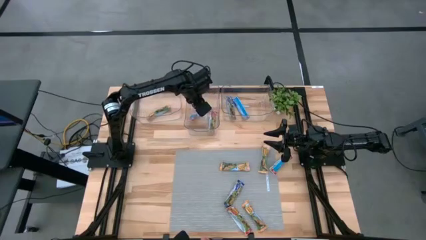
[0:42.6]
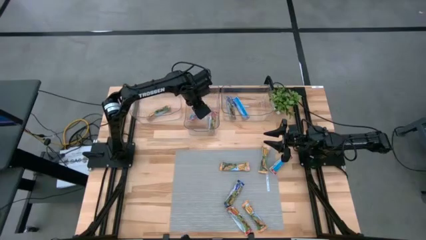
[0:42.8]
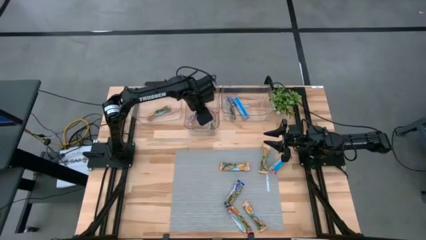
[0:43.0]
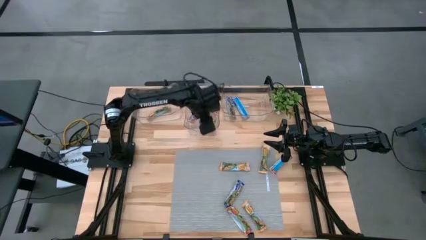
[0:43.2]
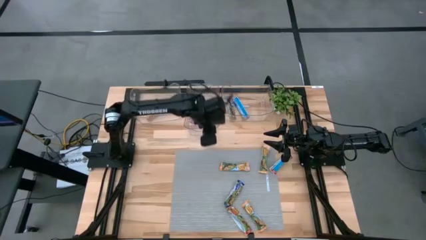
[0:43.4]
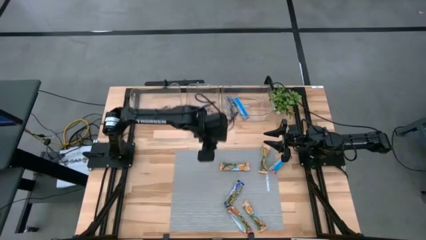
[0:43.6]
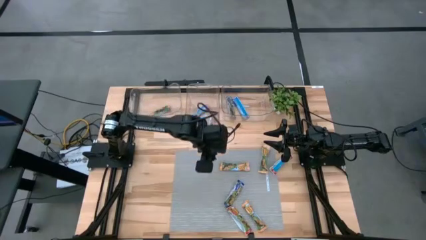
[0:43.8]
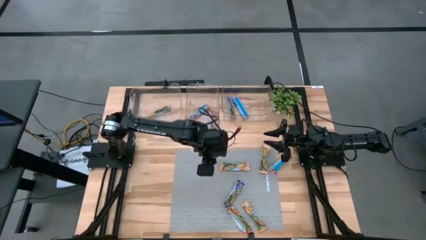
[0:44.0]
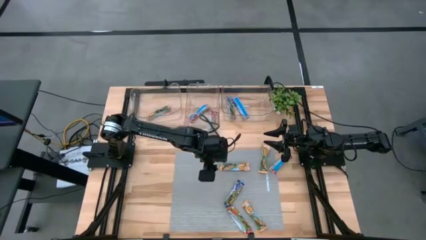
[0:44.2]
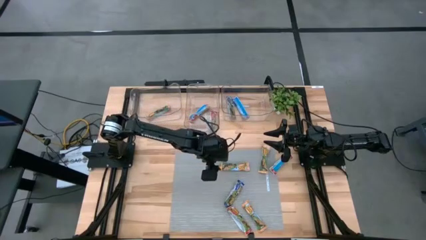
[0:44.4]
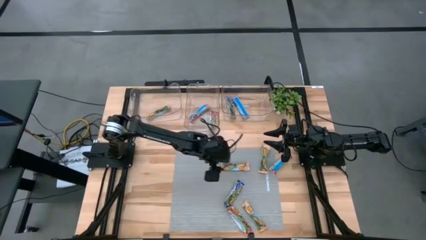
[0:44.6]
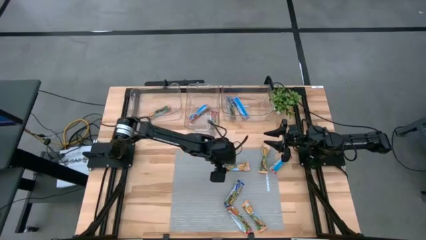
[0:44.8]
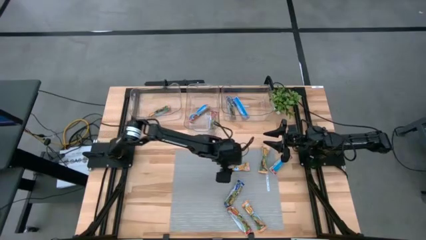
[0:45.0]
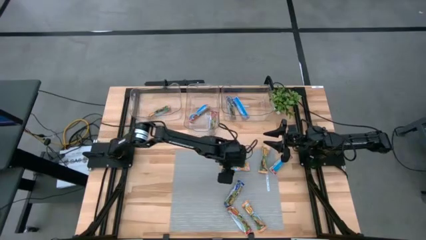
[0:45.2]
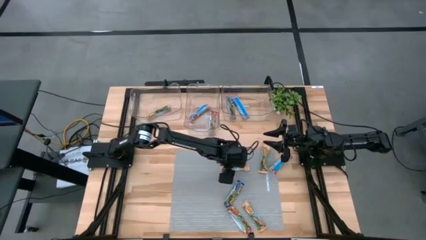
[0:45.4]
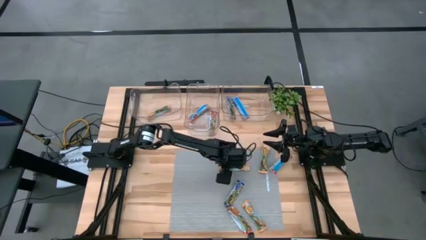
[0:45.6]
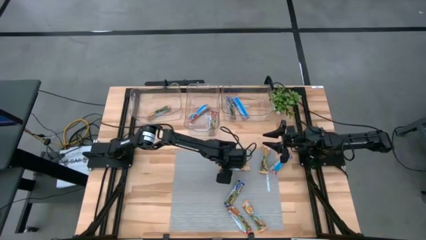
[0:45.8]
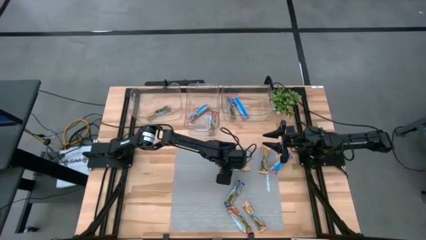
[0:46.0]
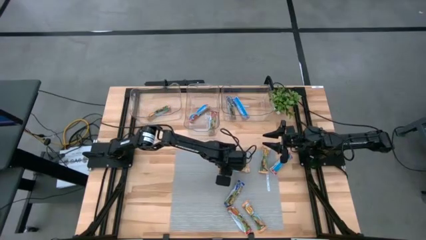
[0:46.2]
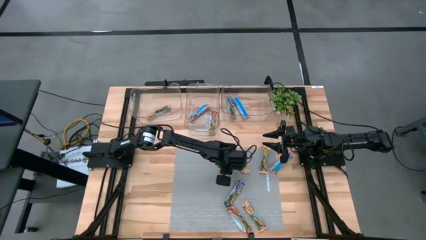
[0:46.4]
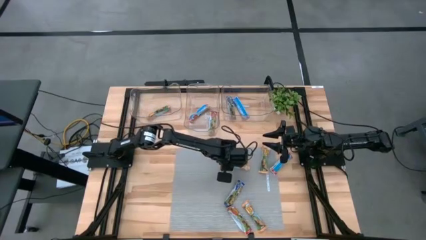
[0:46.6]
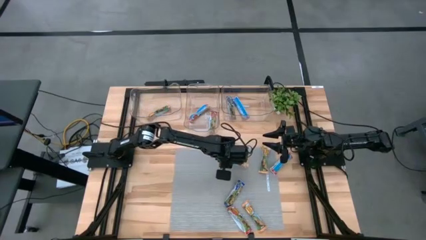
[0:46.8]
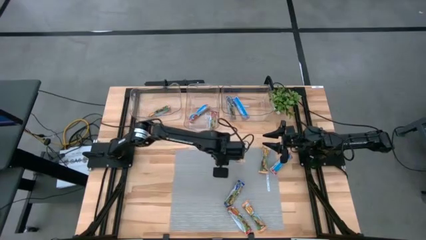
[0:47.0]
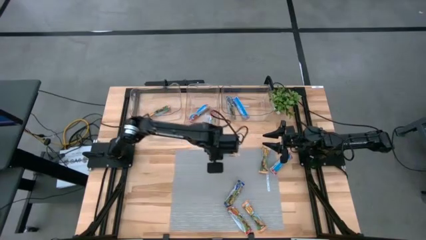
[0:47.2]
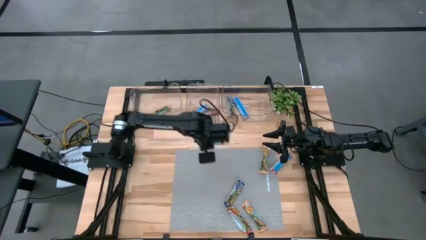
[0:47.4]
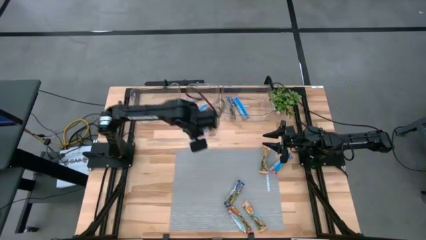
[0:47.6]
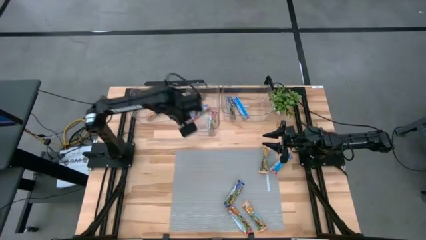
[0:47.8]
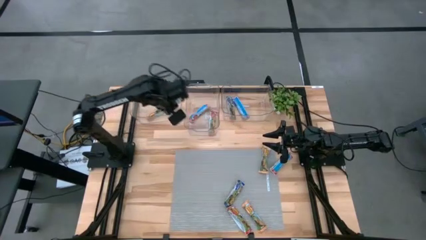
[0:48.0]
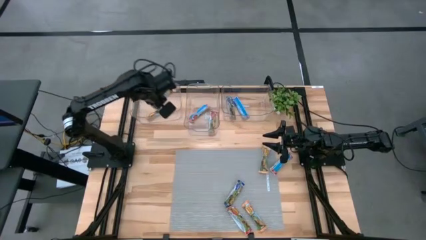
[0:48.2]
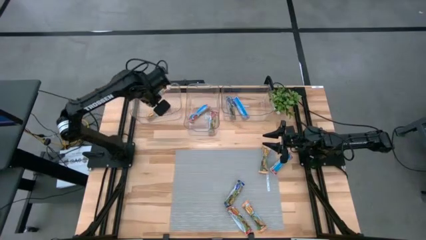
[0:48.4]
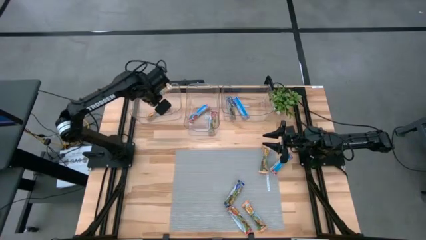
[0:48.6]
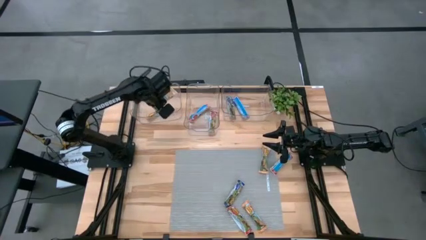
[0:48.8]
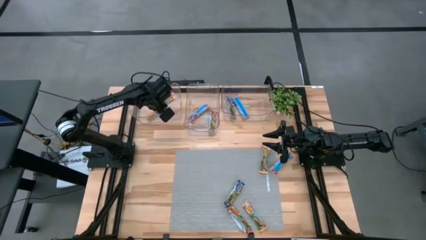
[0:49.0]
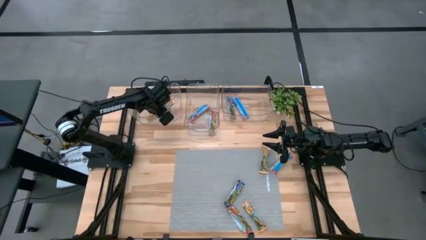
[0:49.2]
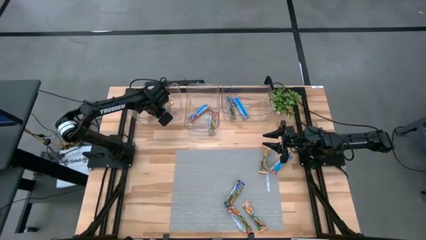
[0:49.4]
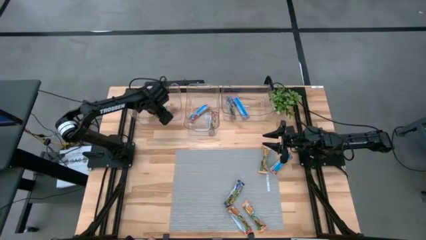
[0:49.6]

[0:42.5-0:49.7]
Task: Pick and place Granola Bars by type
Put the yellow granola bar into the left transparent bin

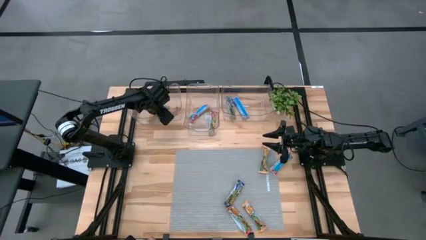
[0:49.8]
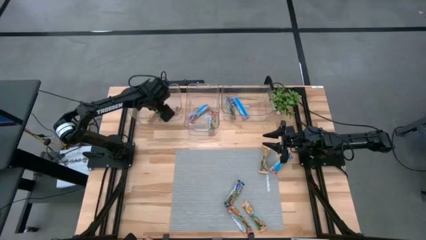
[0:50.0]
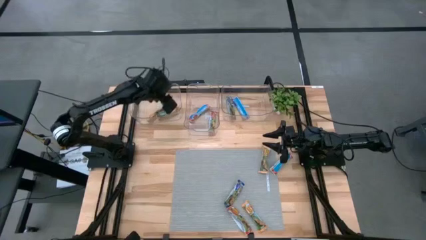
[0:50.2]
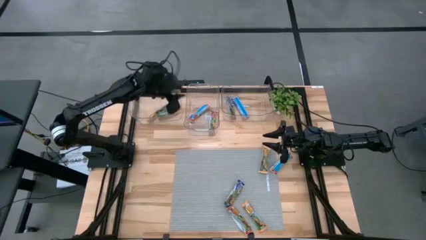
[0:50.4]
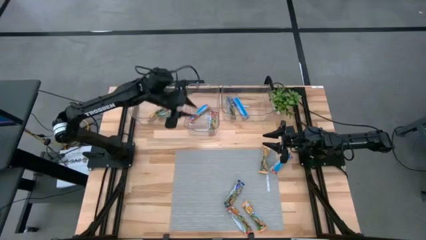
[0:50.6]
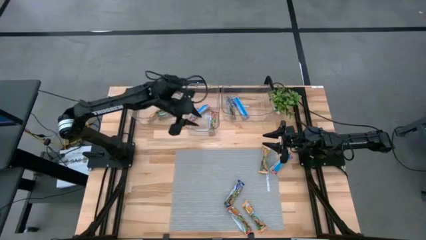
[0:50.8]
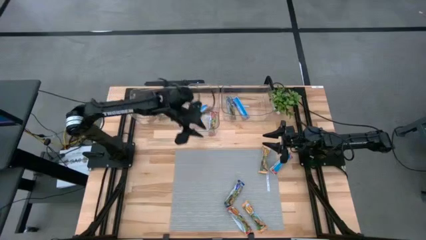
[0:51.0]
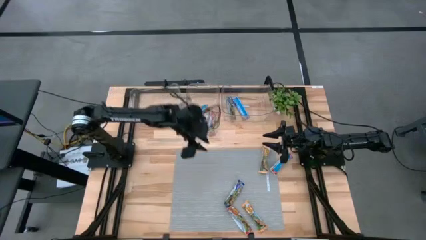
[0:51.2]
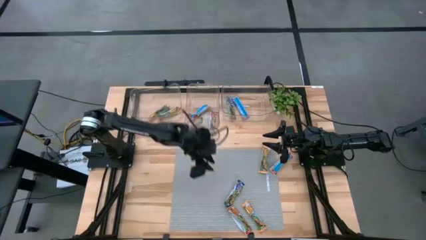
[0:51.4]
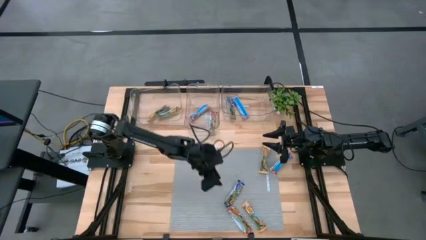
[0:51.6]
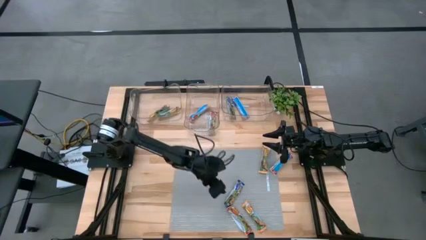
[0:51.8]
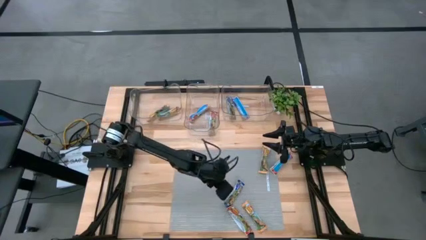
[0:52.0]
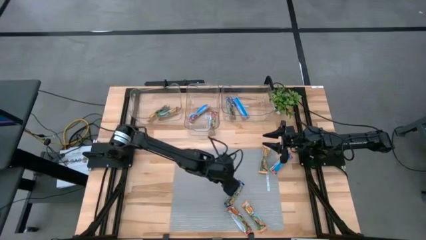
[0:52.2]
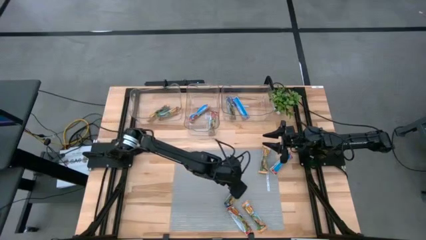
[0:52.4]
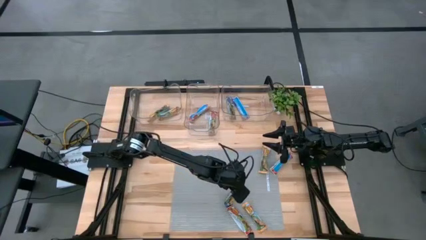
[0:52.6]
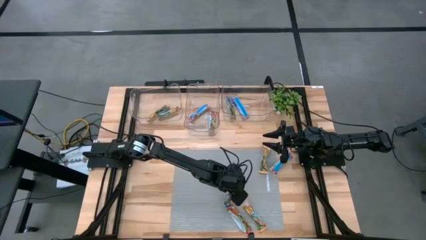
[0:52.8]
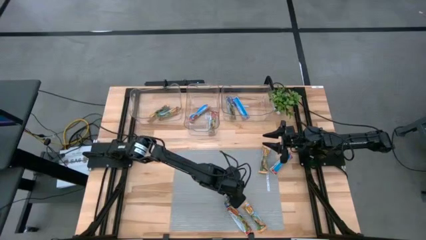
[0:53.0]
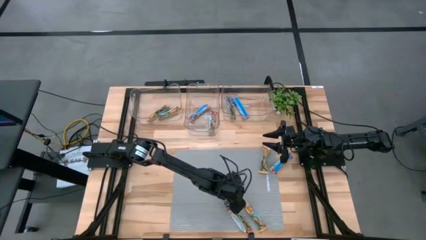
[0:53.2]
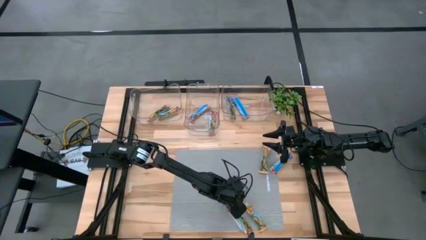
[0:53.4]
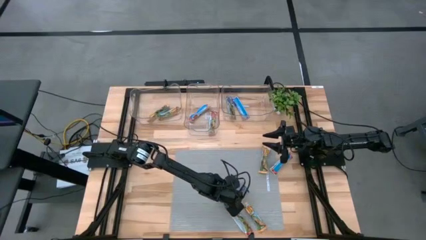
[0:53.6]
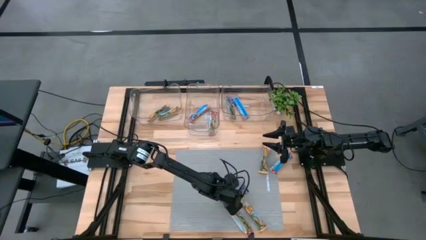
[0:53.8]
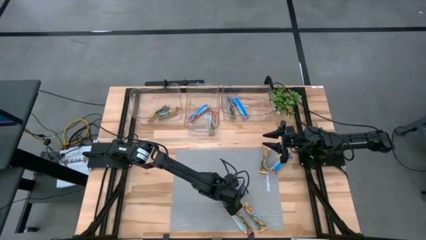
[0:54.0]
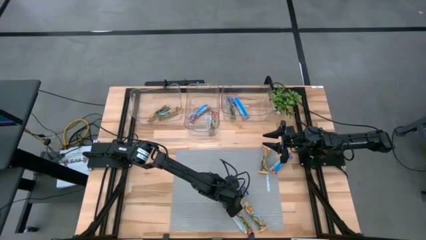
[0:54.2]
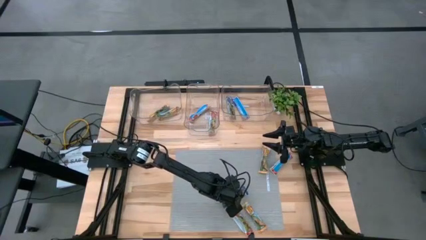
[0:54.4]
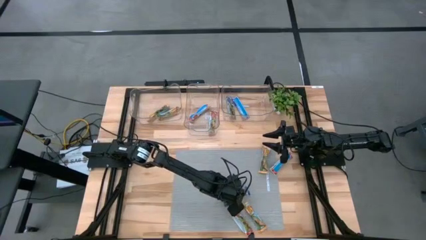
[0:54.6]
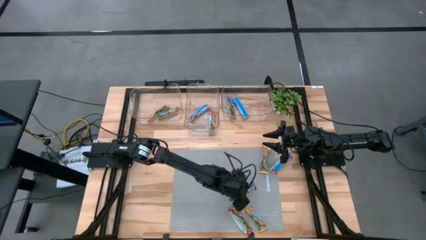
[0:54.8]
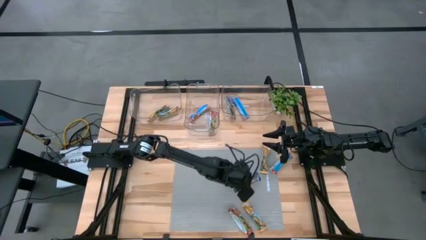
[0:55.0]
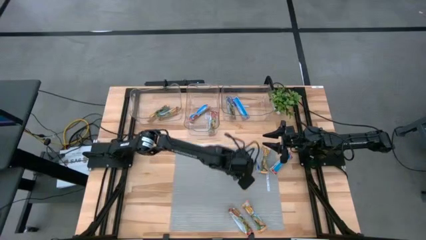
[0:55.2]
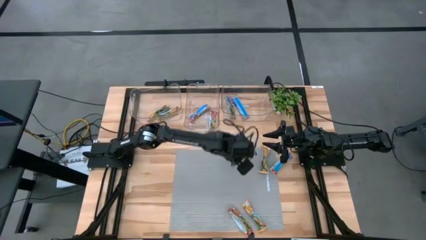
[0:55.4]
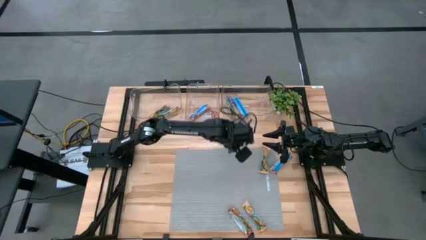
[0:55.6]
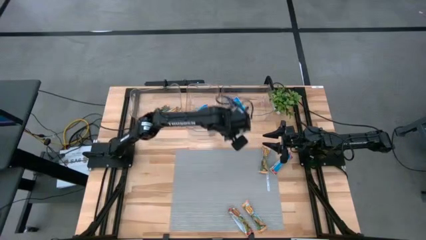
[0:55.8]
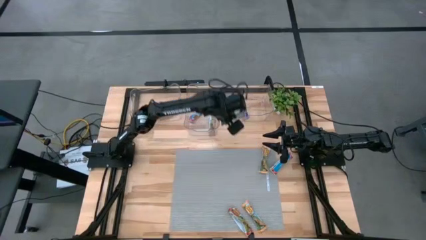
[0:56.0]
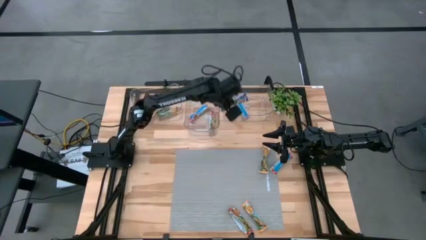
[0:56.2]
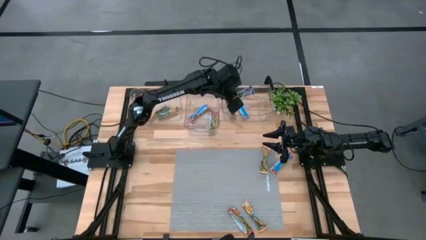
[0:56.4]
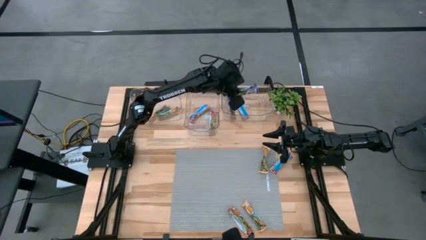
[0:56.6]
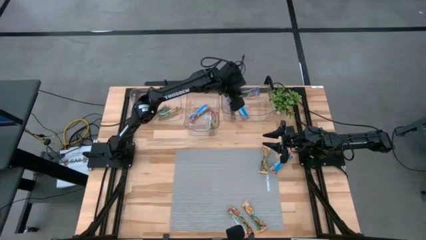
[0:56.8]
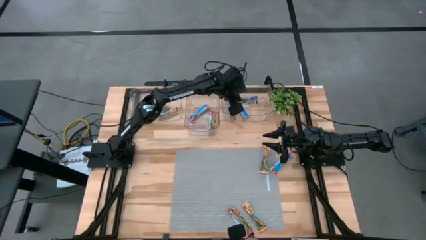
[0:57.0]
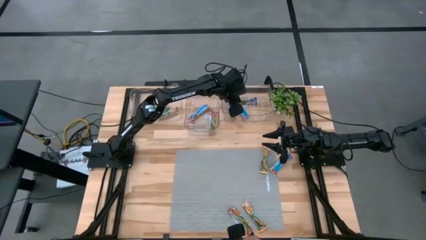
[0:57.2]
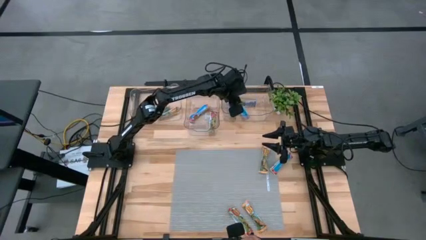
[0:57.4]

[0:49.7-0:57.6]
Put the blue granola bar into the right transparent bin

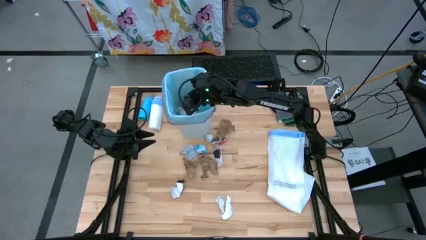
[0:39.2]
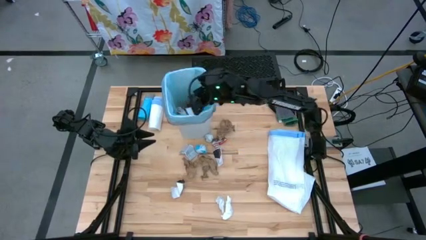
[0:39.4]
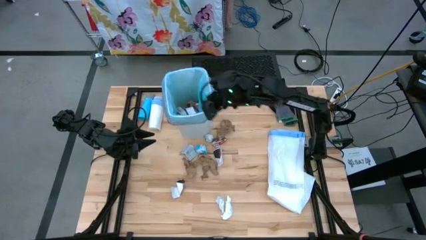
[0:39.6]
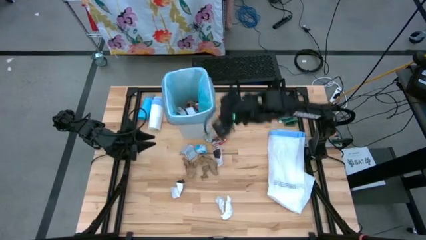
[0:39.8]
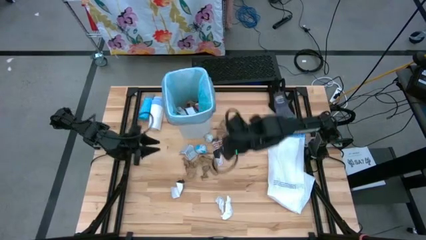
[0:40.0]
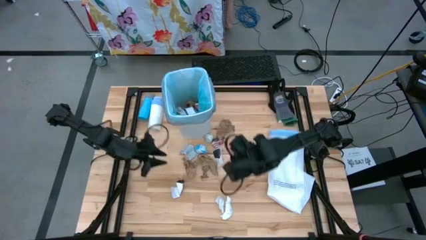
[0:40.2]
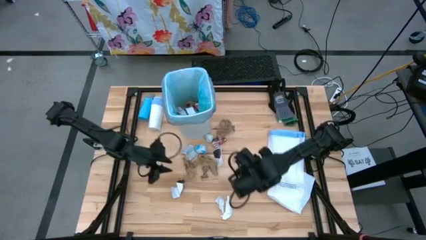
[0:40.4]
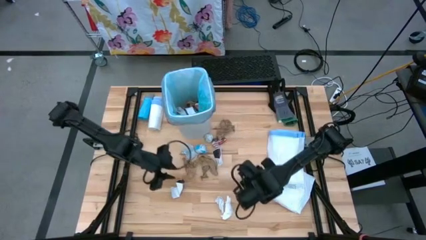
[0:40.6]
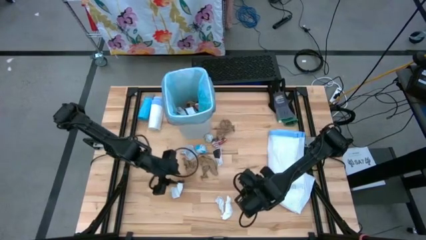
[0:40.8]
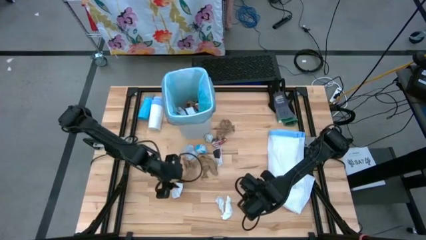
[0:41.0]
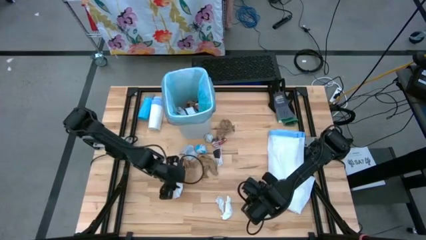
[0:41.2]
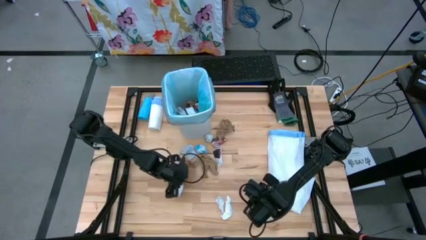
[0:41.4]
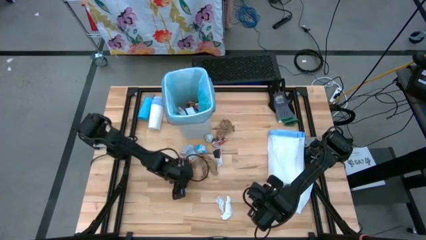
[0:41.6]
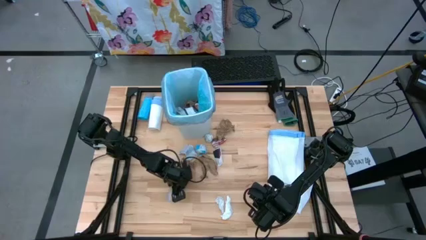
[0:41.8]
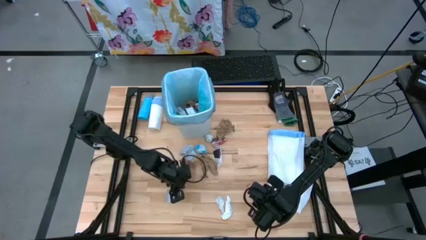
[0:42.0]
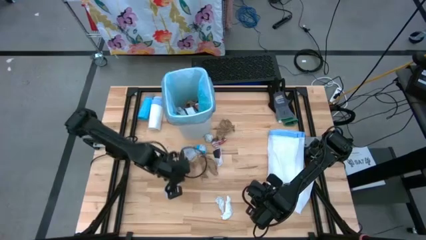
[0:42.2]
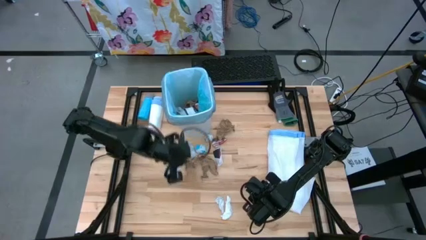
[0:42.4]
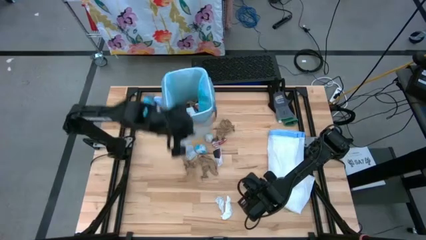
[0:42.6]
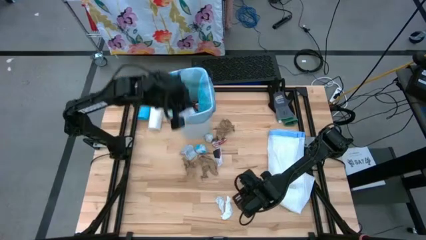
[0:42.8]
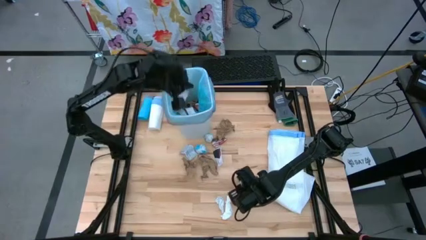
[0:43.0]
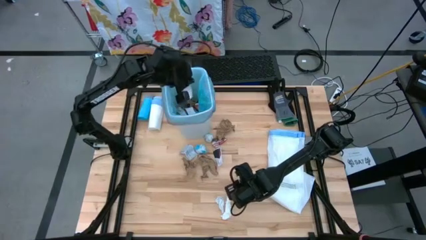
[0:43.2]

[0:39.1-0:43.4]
Task: place trash/remove bag and relplace
Put the white paper into the white trash bin
